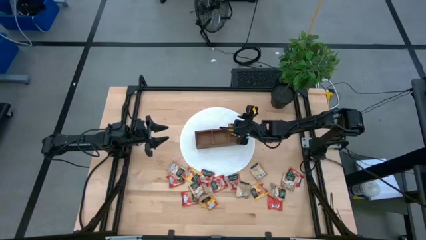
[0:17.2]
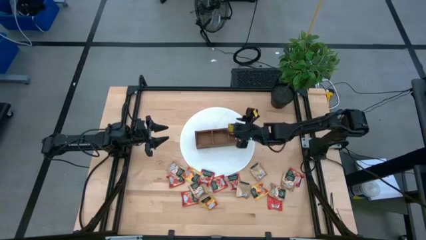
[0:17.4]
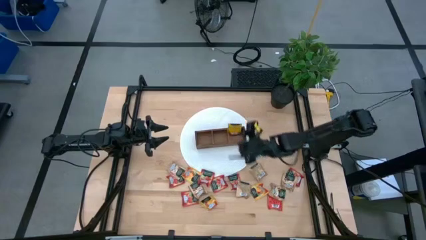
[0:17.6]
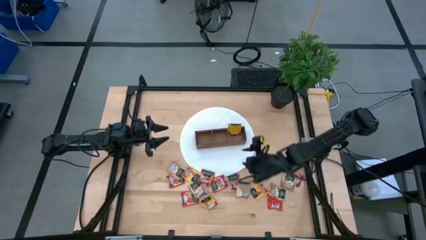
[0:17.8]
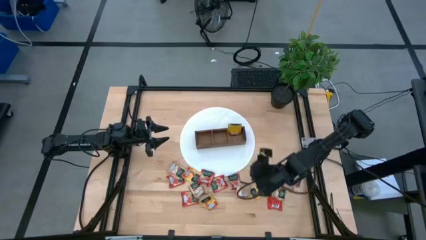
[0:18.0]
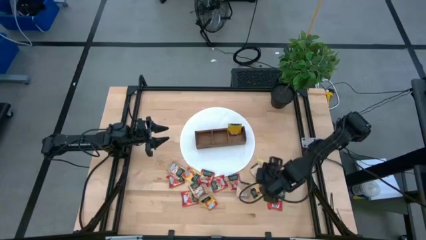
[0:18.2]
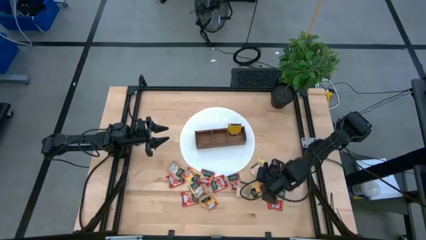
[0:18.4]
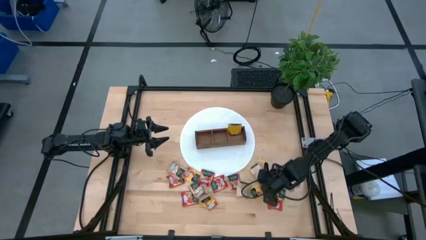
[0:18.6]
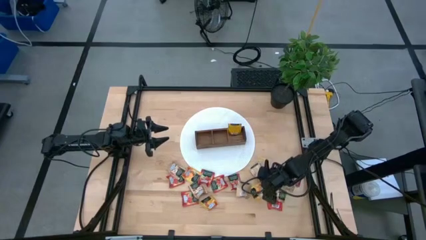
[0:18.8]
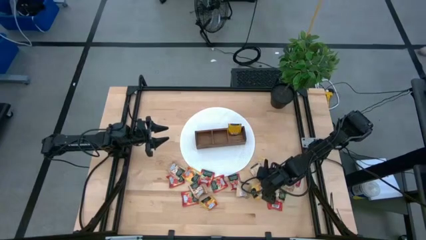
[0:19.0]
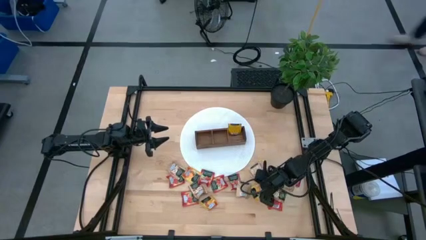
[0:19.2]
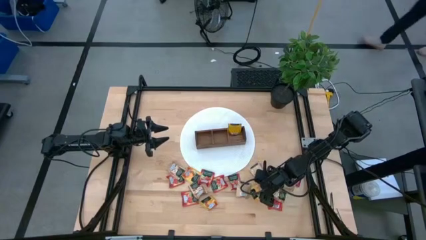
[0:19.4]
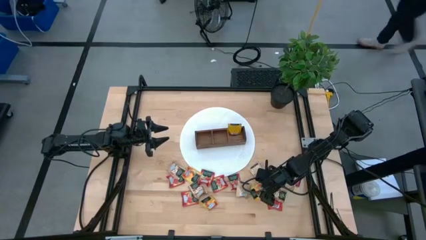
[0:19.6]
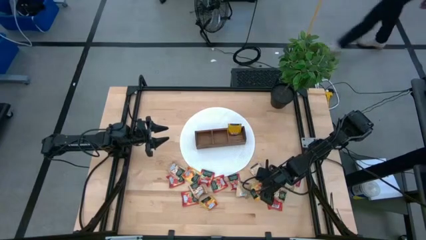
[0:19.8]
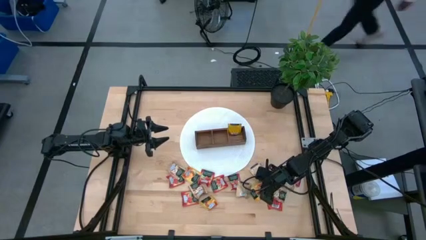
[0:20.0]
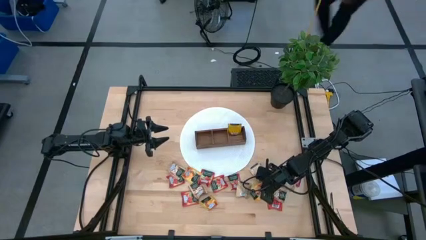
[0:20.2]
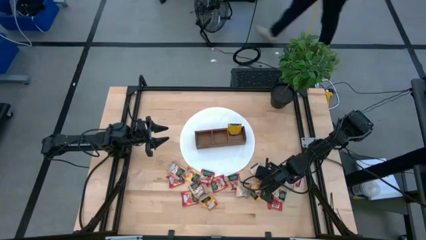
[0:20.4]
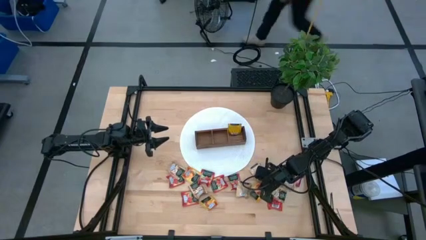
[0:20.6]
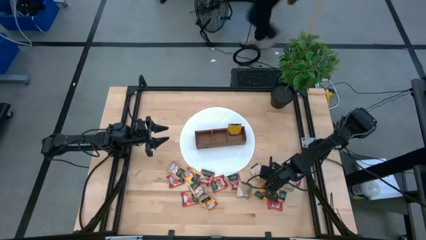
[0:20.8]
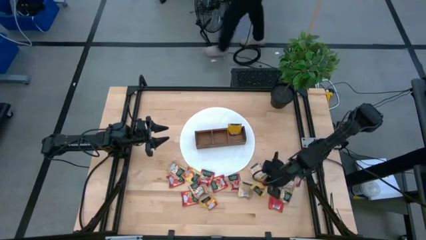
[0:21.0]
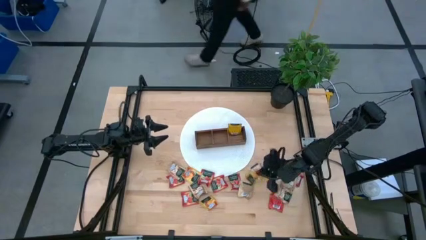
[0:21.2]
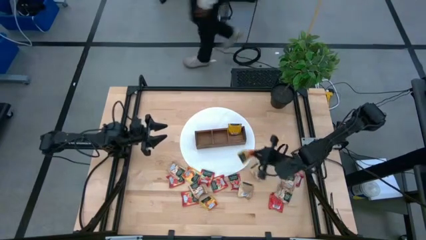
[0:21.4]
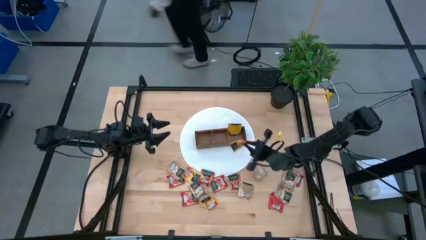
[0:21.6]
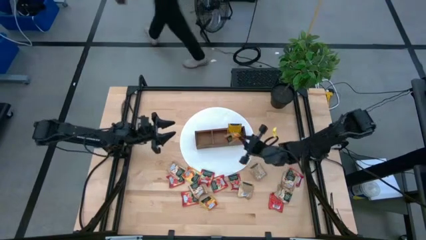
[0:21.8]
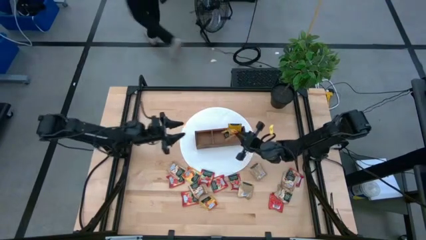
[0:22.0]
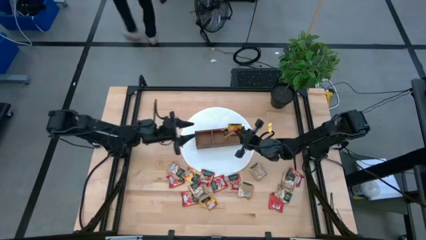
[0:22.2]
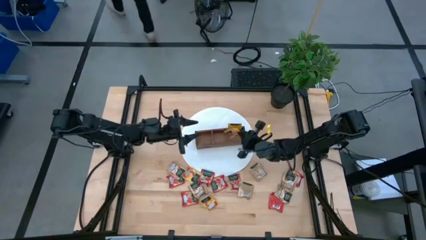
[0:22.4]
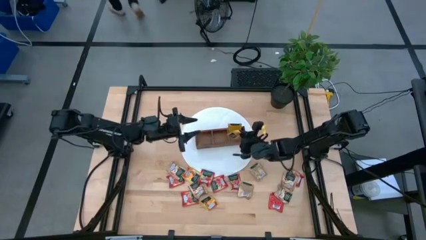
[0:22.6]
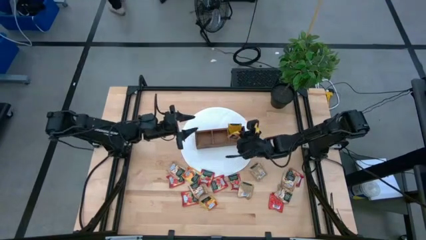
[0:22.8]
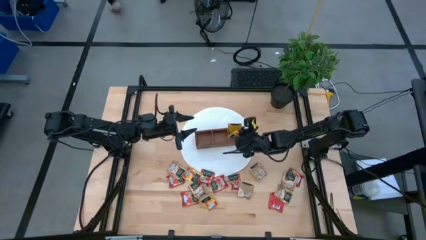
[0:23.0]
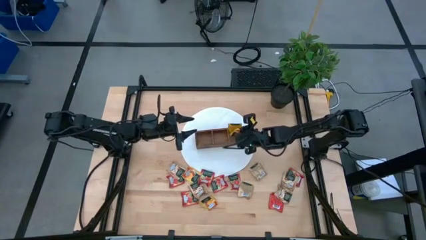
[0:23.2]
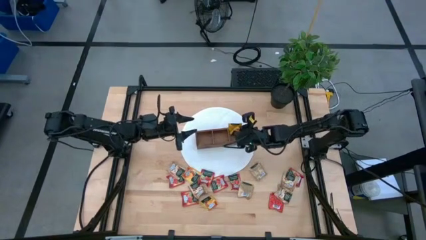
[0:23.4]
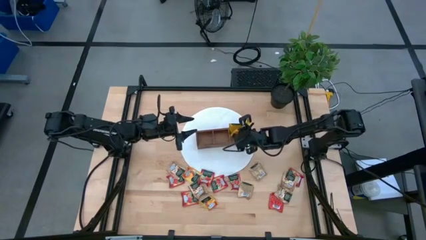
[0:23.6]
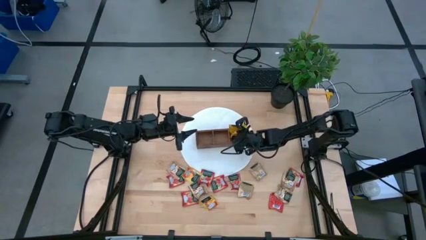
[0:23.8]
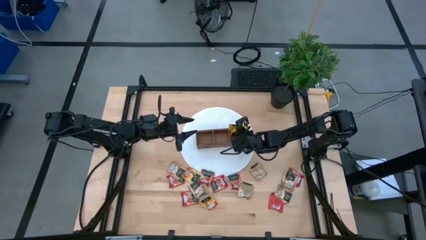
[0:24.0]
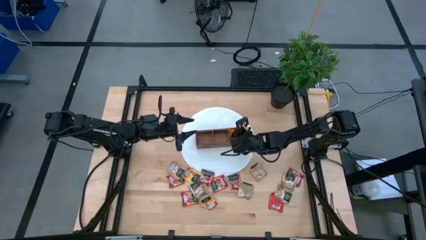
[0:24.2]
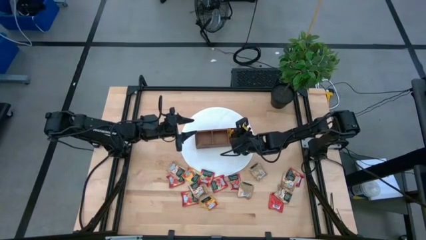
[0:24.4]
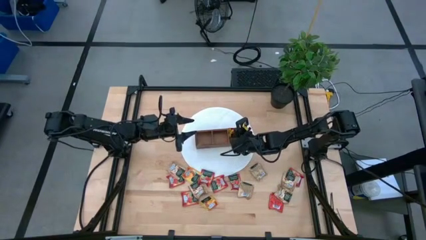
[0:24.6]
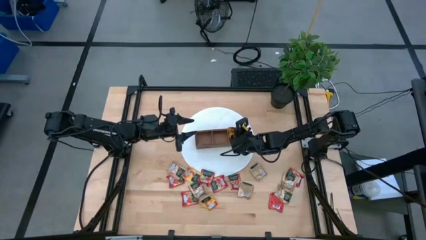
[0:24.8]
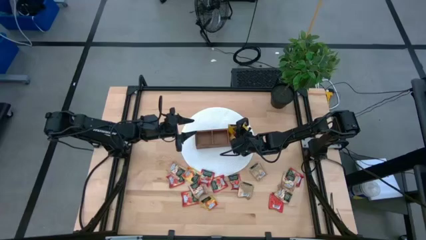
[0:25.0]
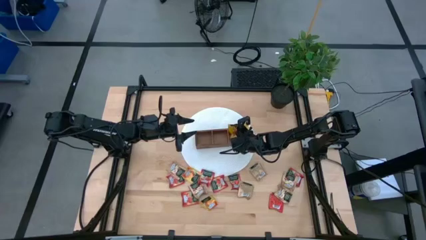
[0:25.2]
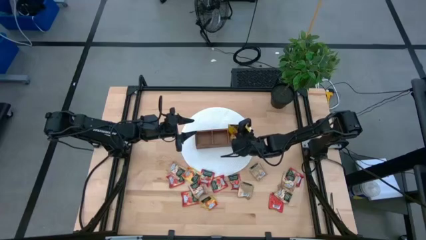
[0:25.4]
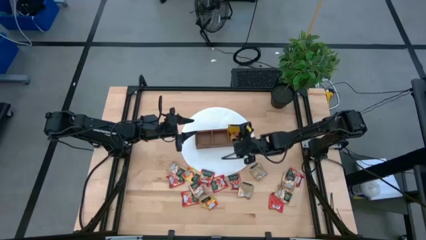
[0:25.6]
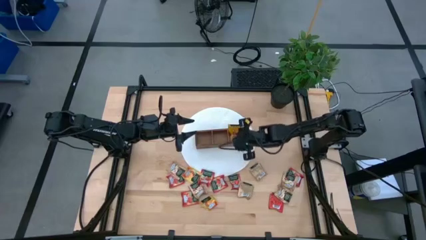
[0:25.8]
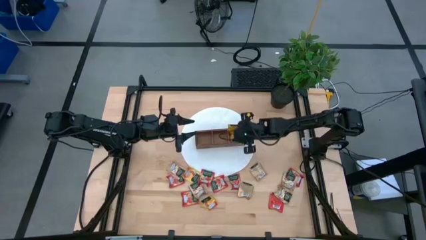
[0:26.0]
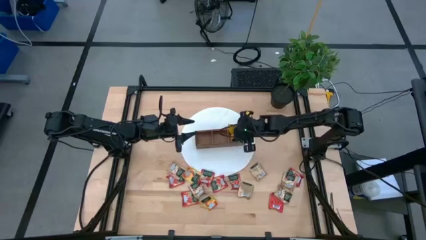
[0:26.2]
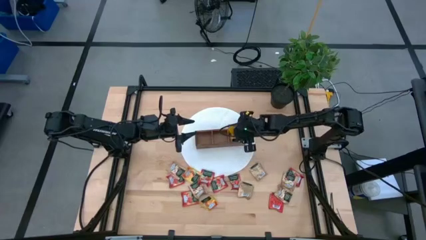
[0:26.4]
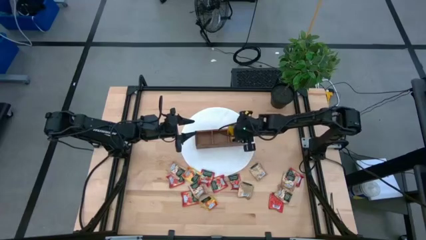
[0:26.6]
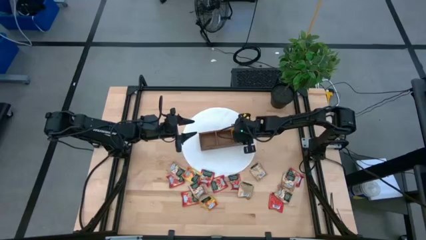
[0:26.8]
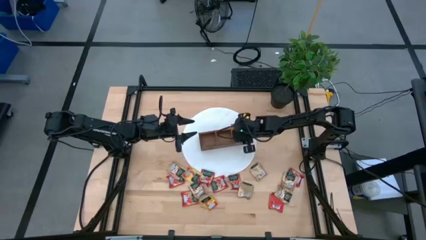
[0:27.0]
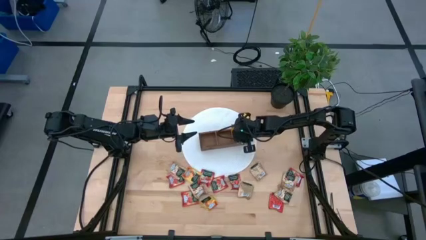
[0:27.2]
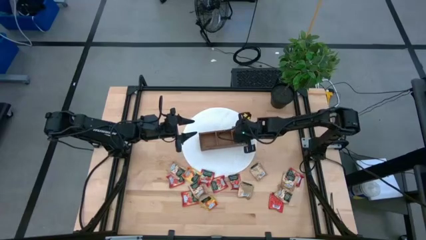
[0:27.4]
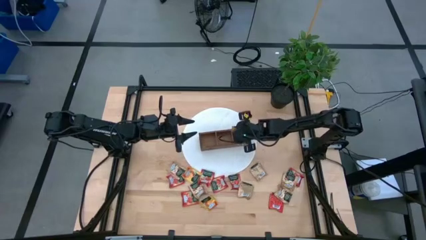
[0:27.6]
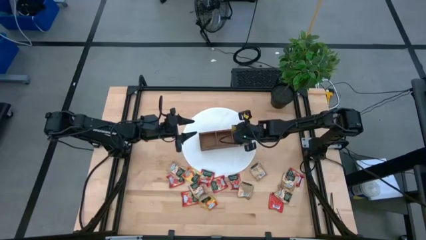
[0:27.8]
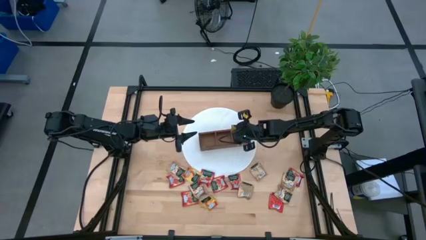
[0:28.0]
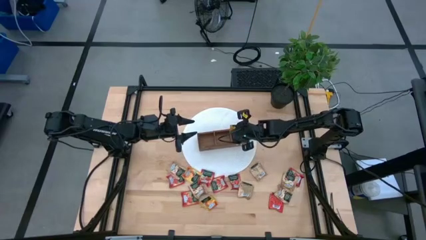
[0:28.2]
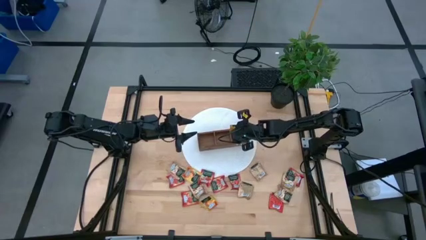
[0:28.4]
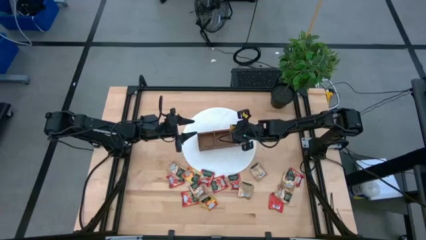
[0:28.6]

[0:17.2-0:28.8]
Task: Pick & Place Tea
Put the yellow tea bag into the right section of the wooden organizer

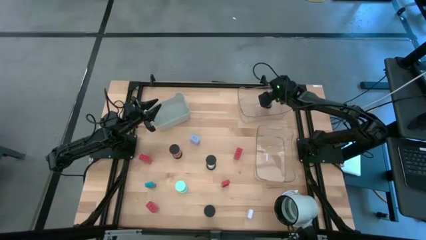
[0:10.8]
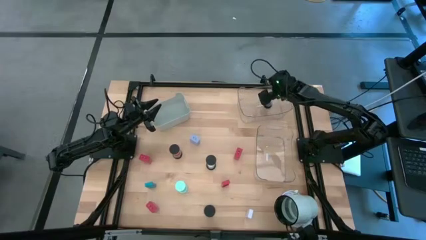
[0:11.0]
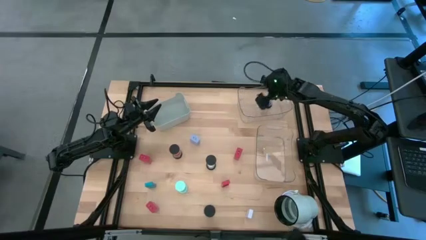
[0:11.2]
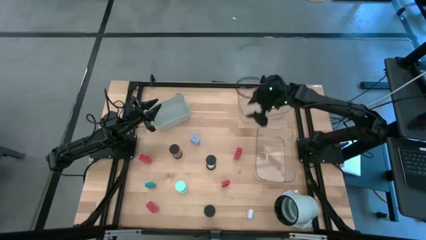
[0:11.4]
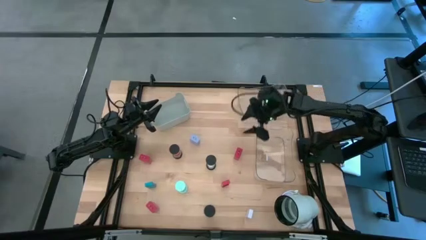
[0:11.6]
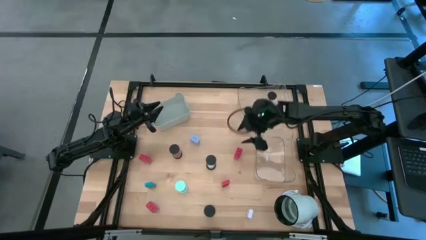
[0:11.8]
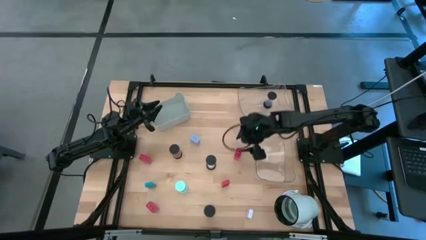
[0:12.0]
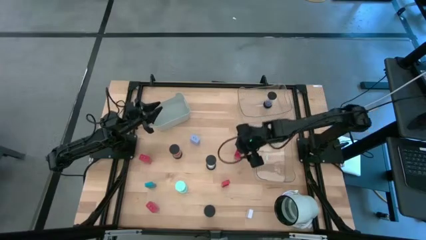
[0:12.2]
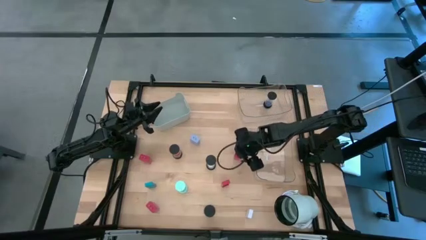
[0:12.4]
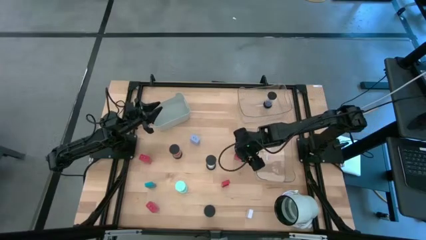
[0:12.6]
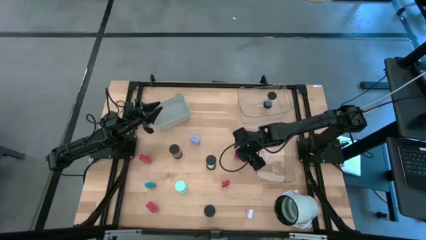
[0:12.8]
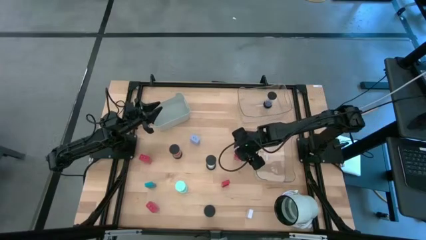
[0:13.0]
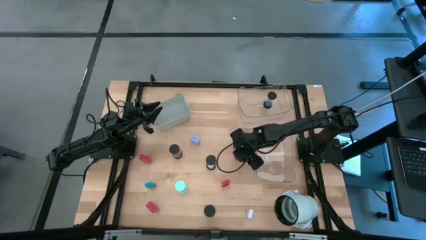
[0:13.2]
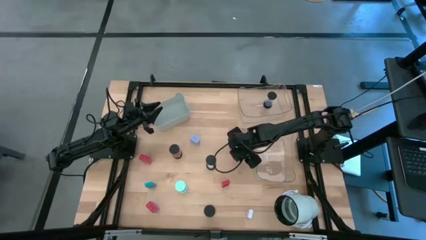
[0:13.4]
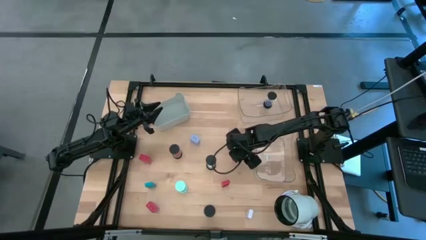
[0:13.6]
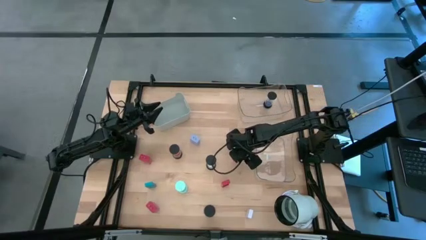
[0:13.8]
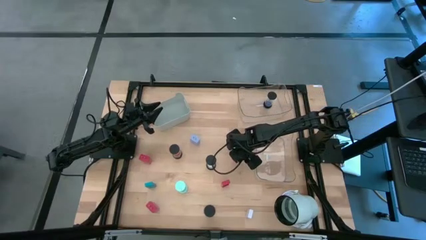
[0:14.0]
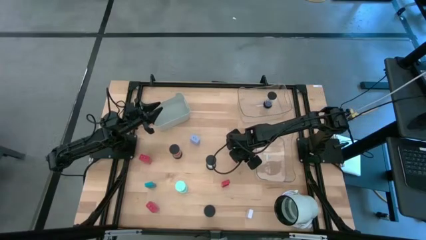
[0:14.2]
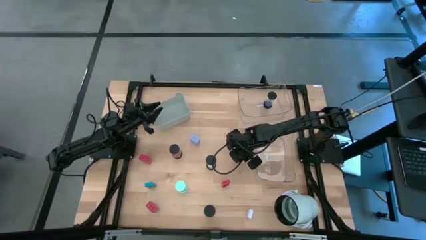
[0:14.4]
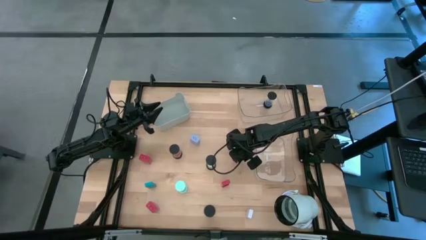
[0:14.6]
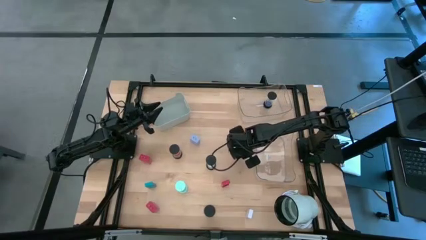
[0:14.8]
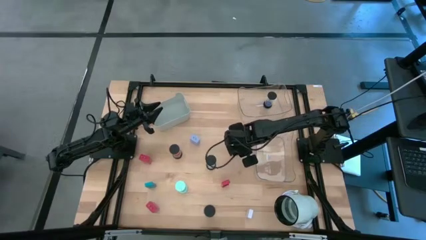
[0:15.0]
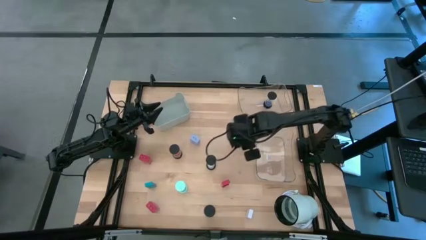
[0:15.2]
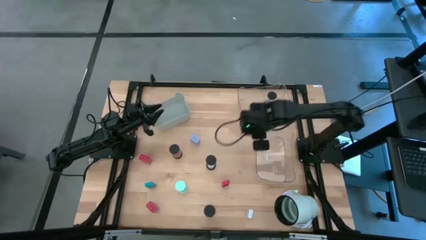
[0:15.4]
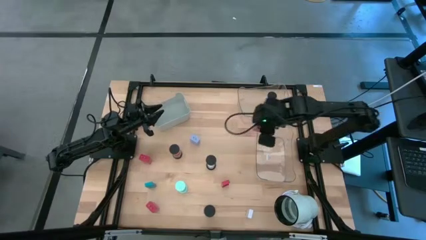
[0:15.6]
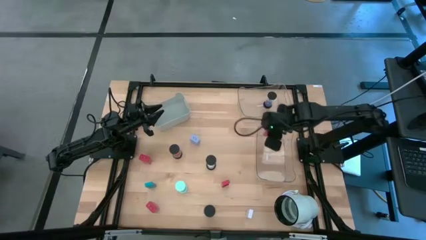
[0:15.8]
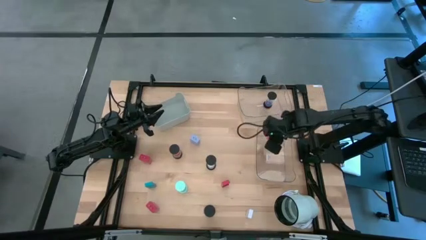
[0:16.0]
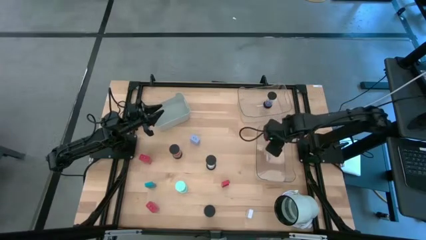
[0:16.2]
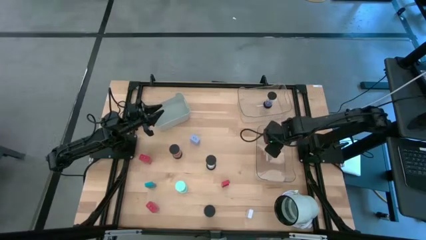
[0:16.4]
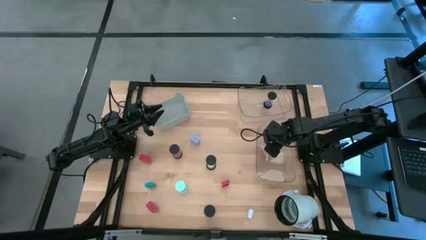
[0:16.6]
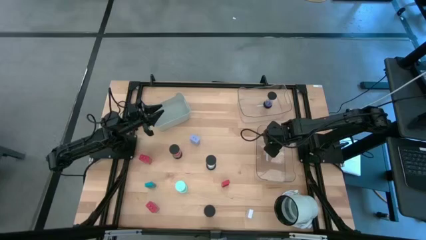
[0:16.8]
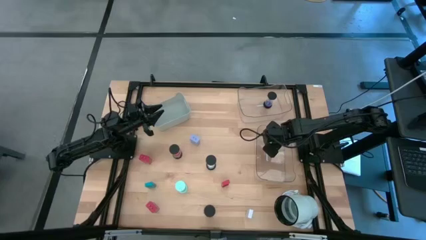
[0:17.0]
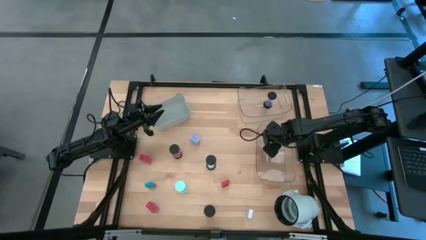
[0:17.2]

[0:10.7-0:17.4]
Task: Pick & Place Office items
Put the top right red charger adapter into the bottom transparent bin
